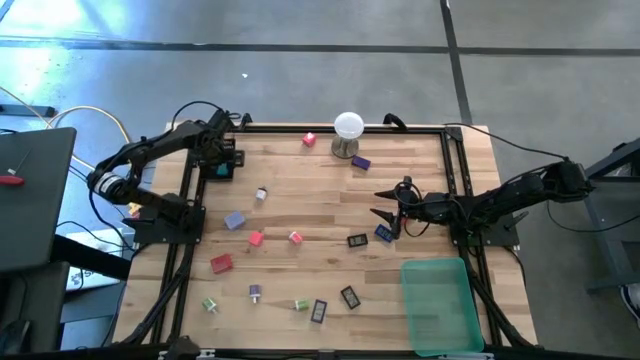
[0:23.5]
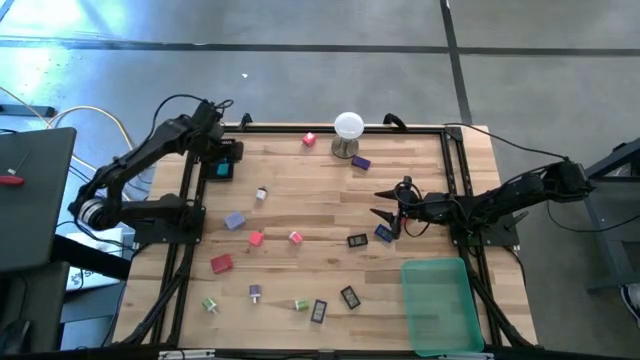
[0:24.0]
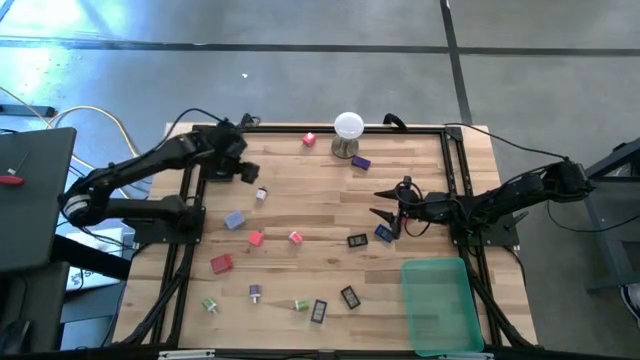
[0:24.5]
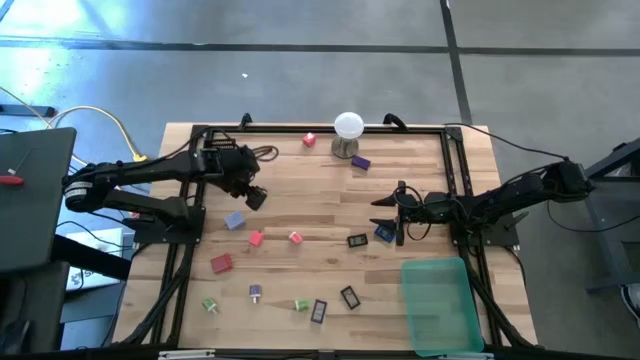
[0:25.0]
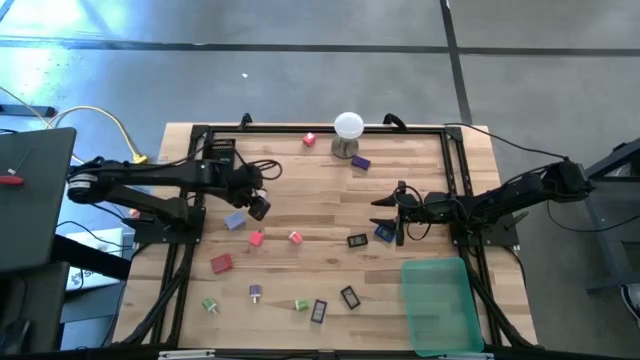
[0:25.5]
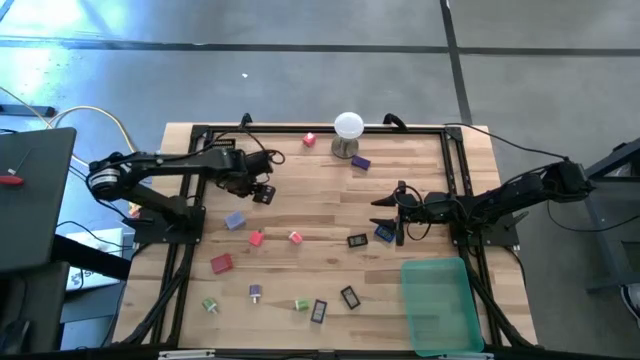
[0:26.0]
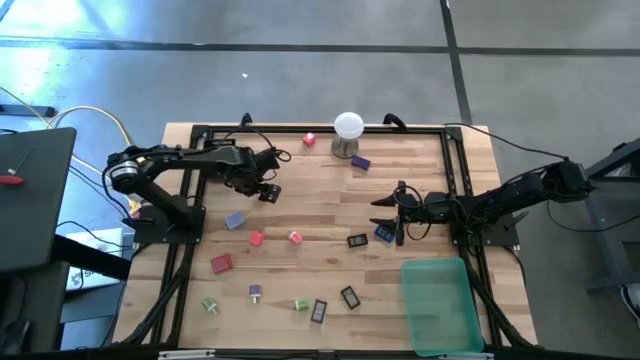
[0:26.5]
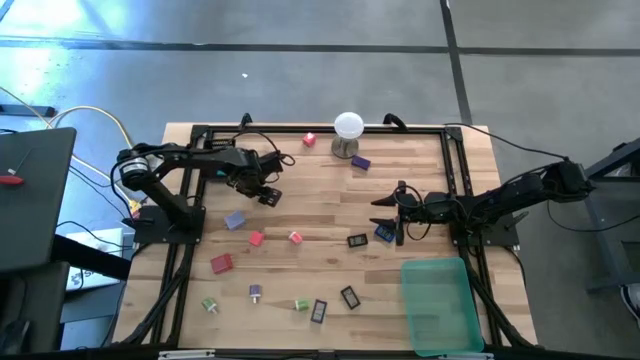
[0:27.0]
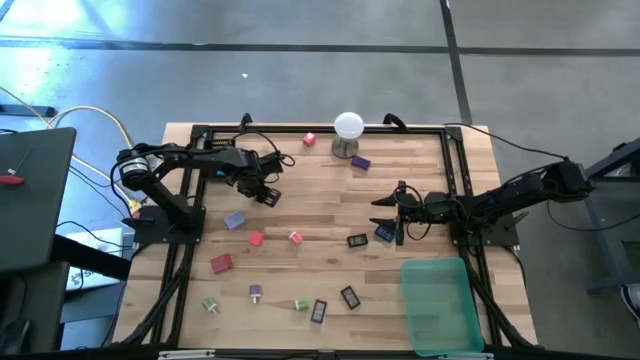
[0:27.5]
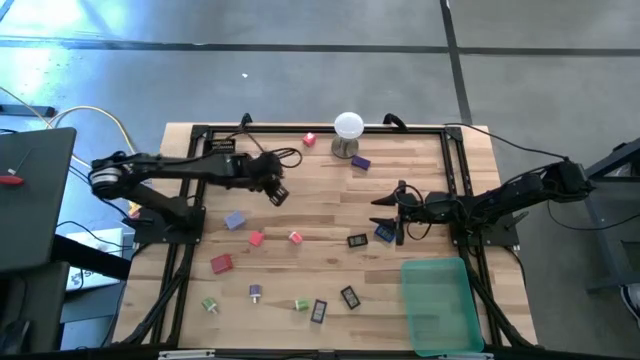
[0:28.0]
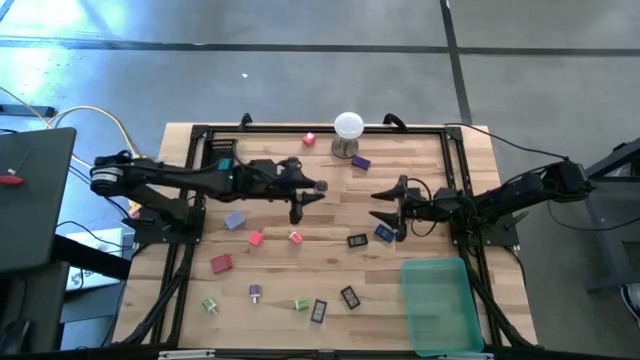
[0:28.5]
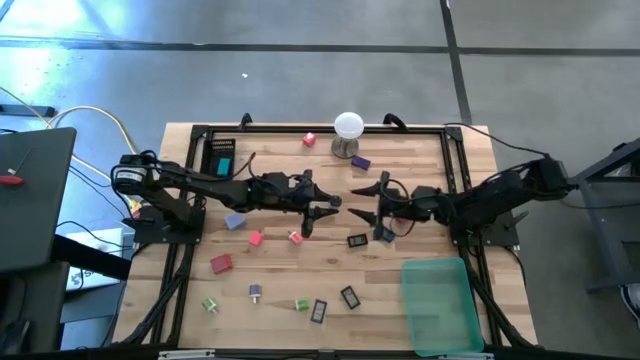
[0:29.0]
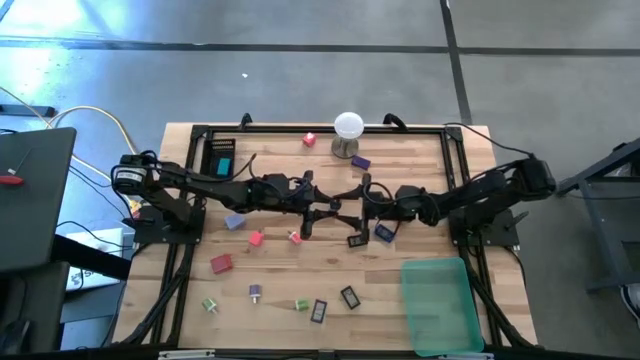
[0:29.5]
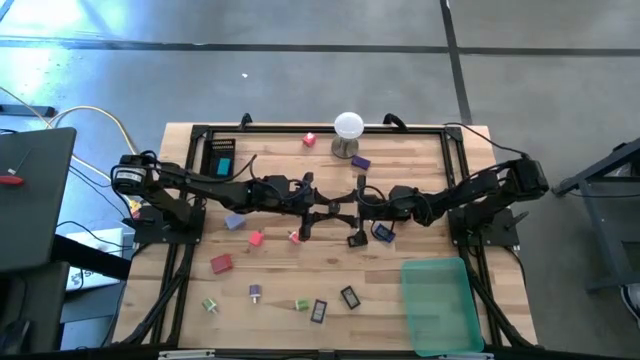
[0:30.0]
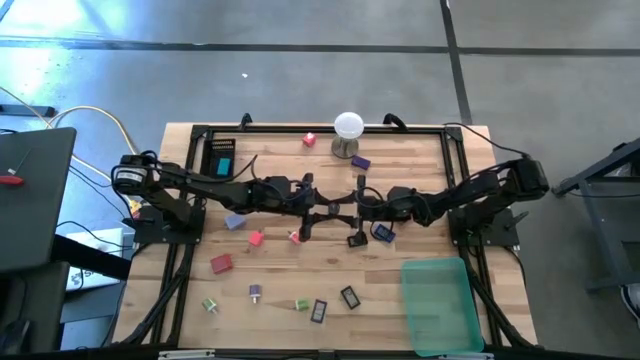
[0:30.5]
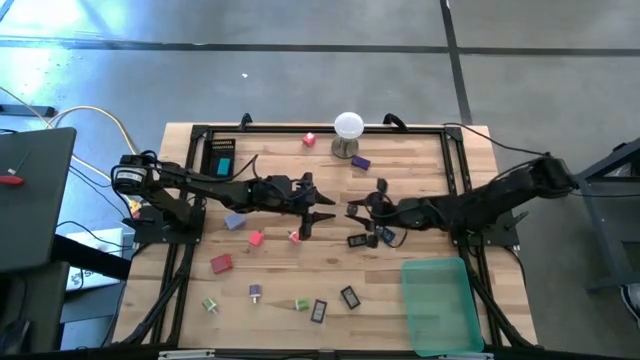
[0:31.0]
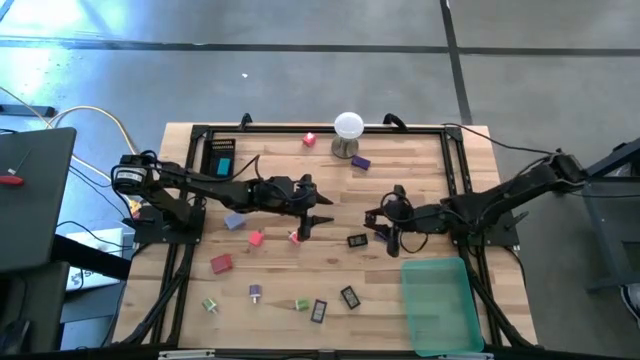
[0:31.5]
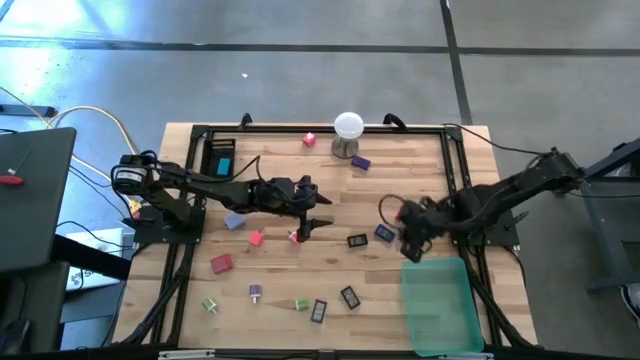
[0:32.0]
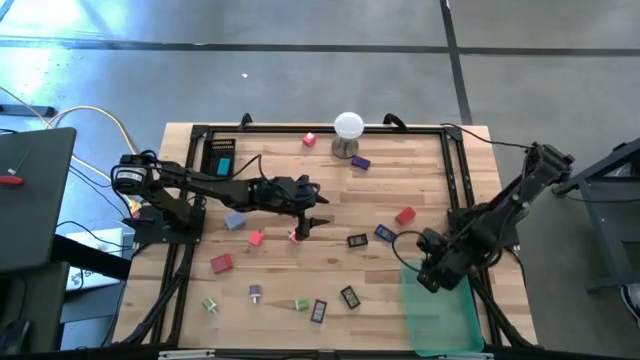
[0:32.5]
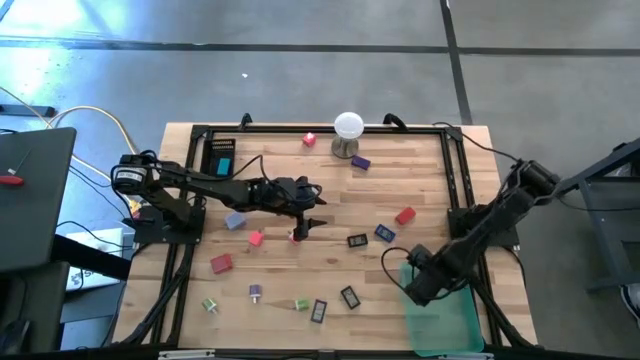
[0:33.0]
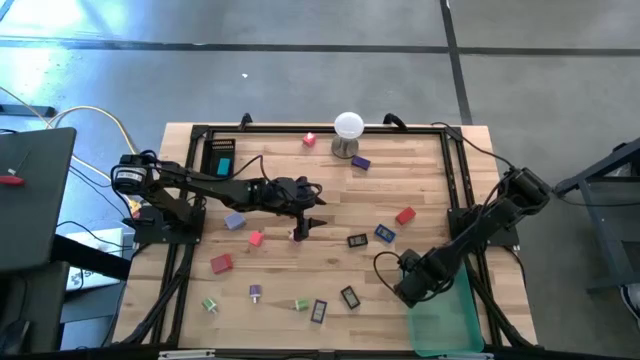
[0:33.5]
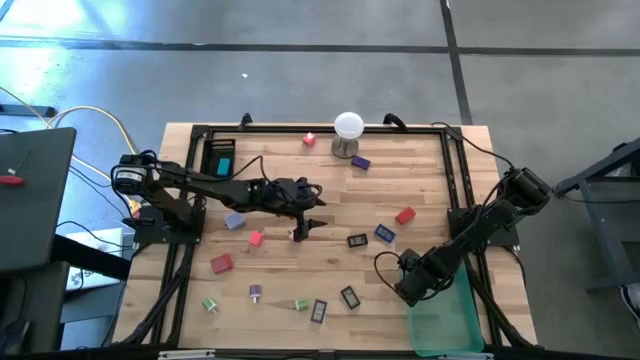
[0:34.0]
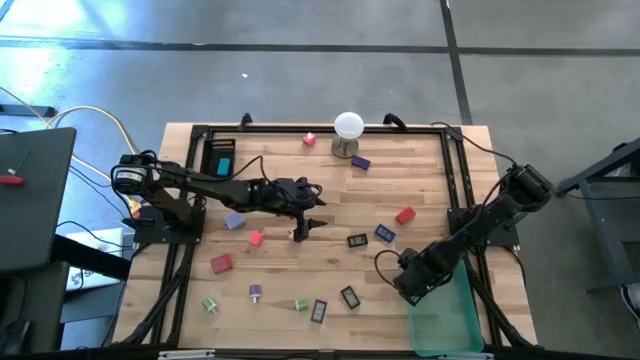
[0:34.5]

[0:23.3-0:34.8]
Task: Pick & Place Office items
Put the white charger adapter into the green bin

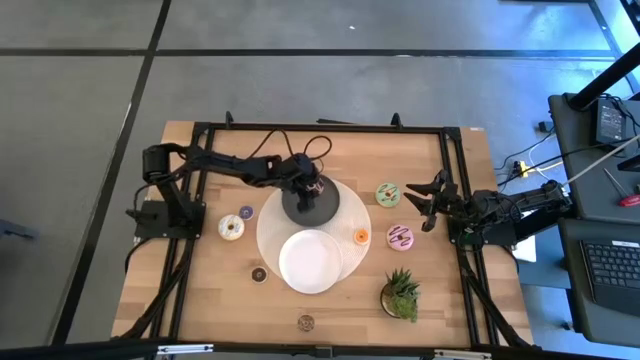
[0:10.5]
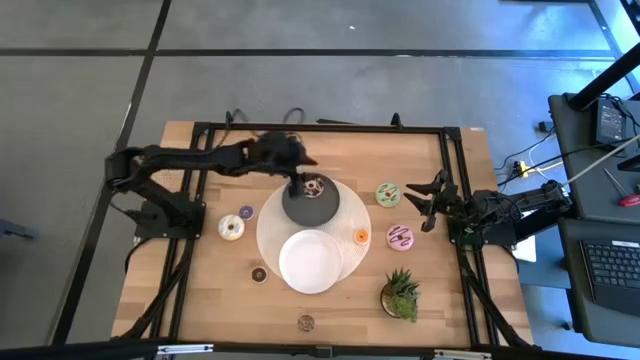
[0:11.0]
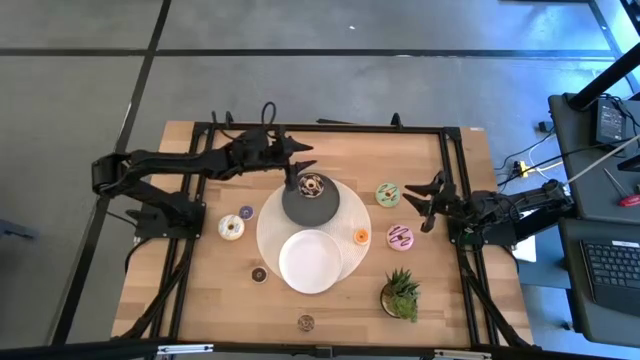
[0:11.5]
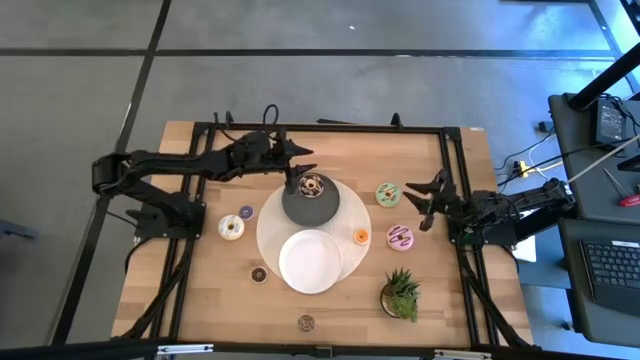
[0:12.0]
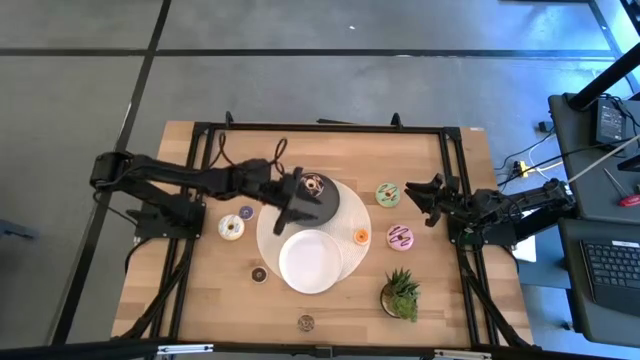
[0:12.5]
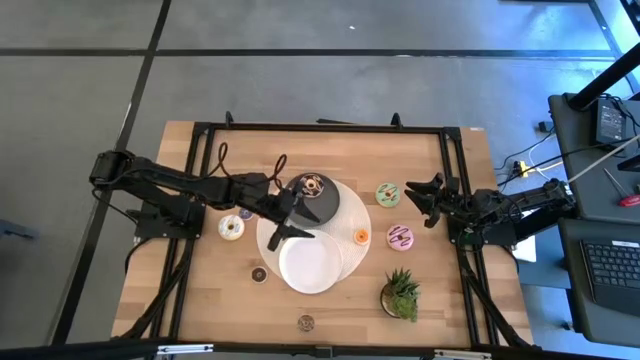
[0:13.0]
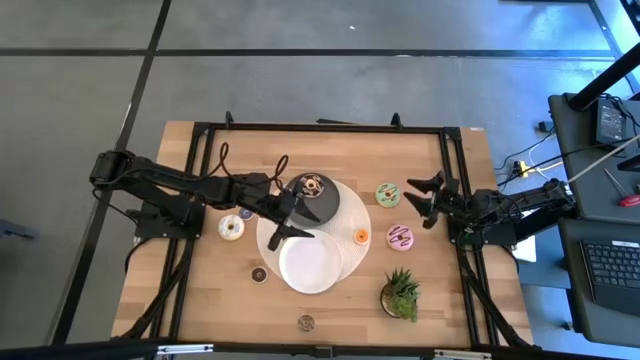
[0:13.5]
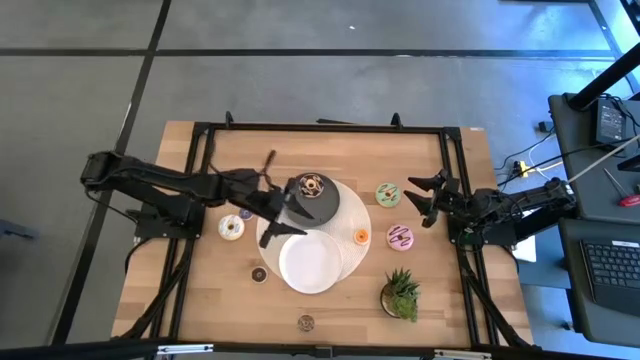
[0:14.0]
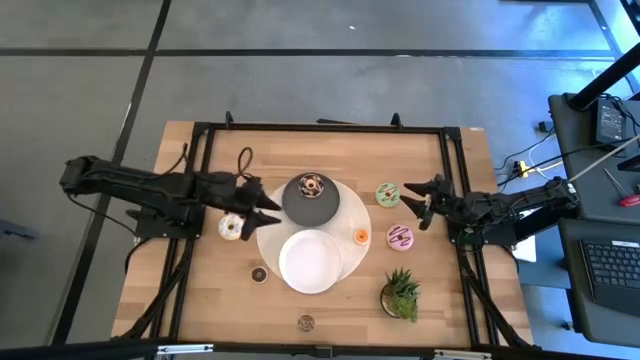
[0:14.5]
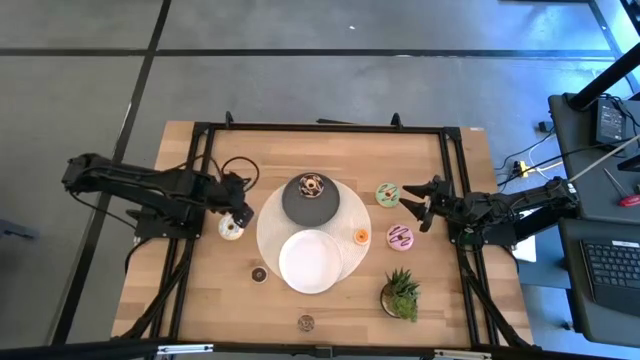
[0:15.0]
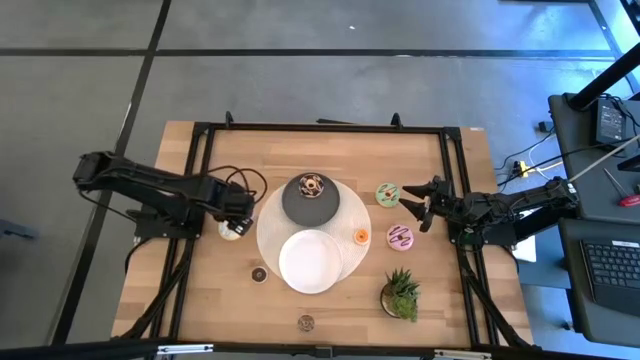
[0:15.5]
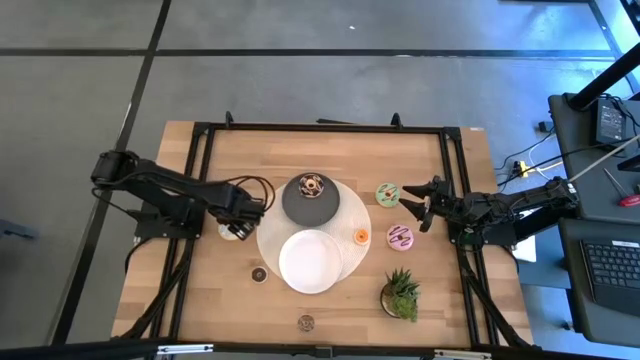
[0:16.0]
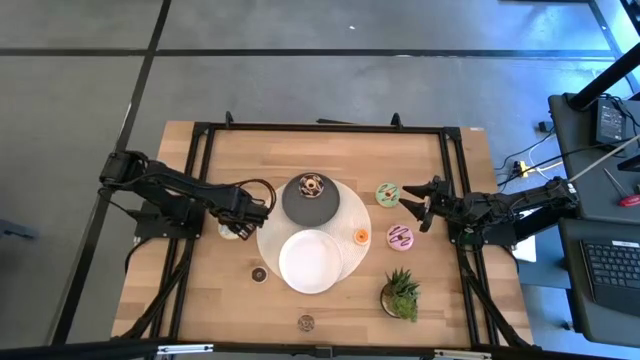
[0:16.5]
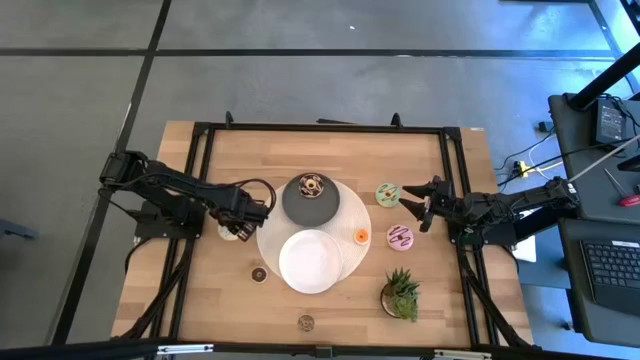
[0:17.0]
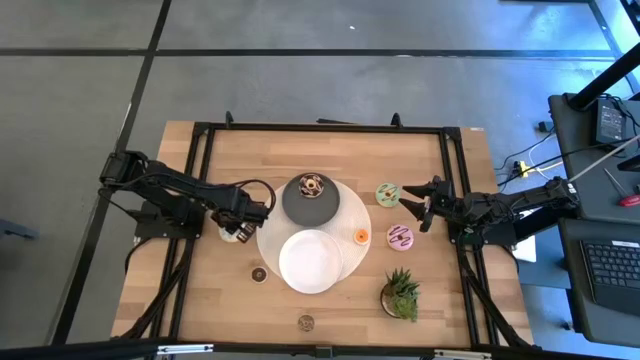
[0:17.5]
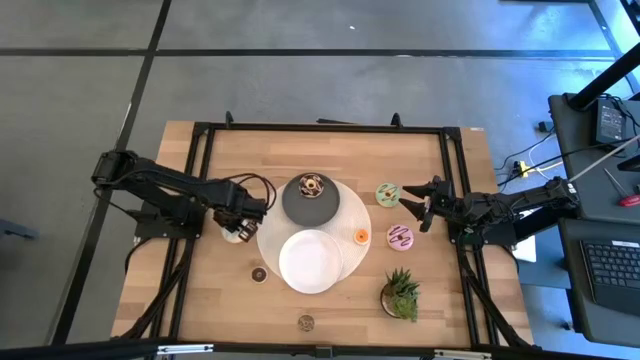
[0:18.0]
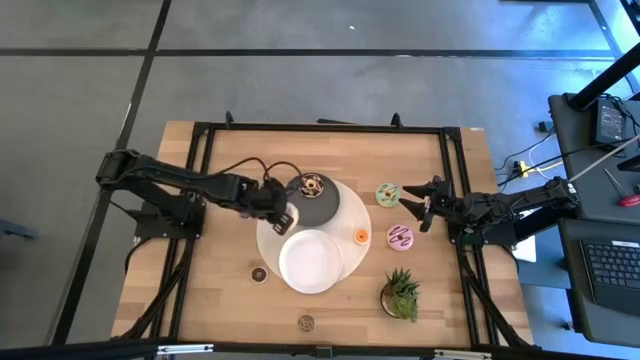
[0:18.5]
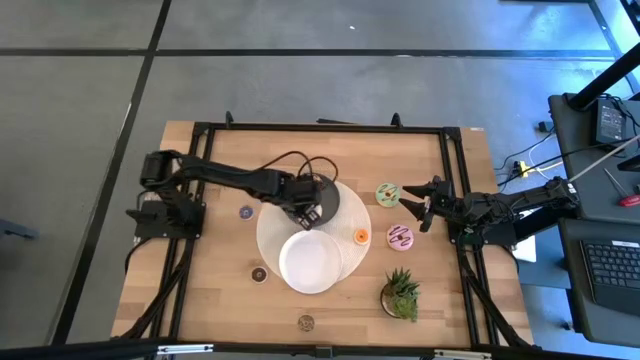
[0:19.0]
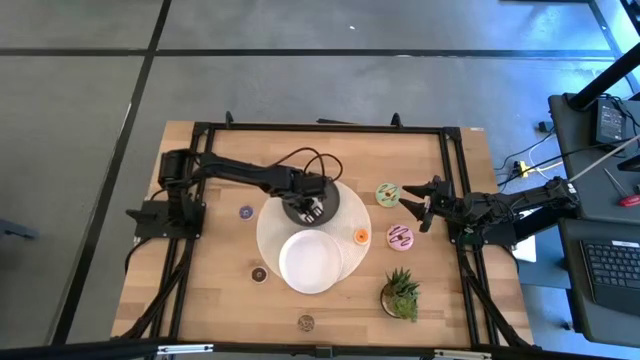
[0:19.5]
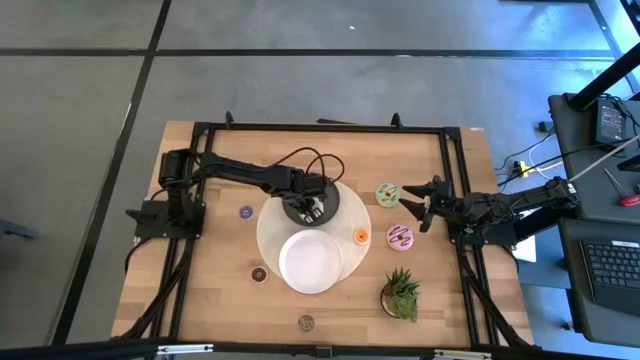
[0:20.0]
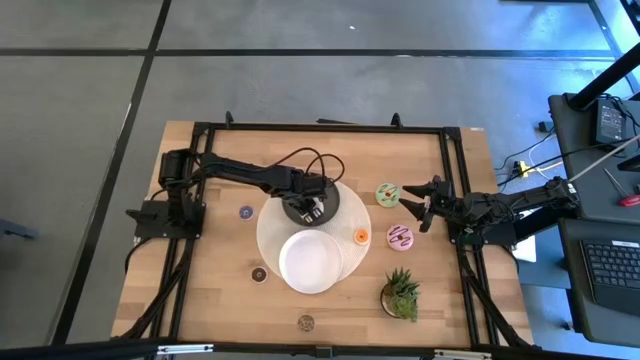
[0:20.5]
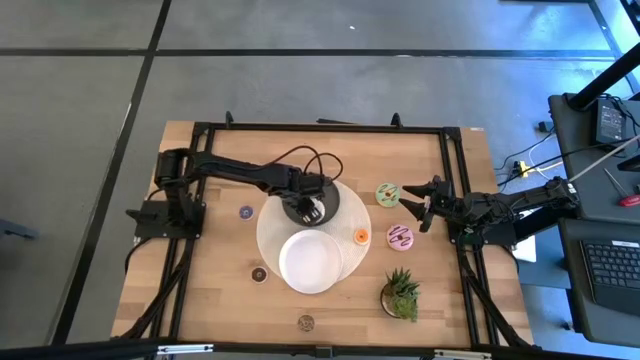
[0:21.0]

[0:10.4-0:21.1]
Task: Pick & Place donuts
Put the big white donut on the gray plate
